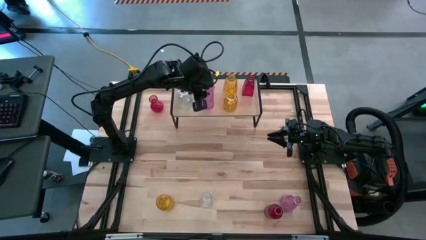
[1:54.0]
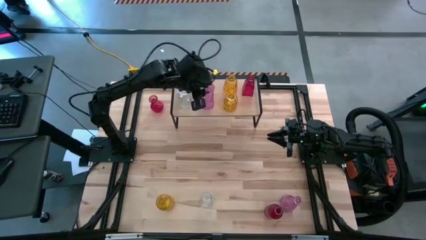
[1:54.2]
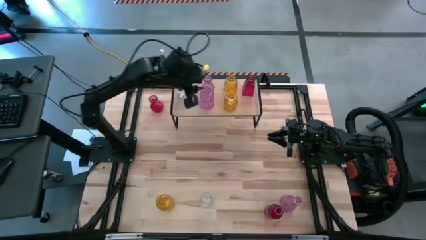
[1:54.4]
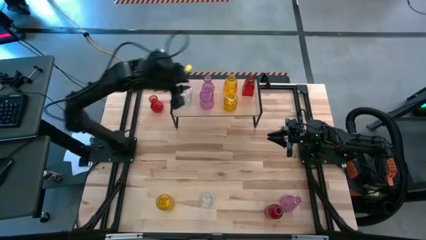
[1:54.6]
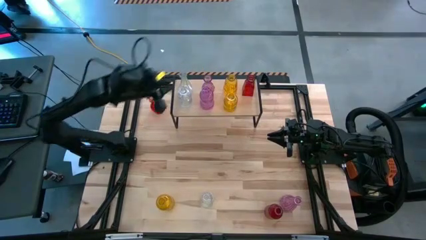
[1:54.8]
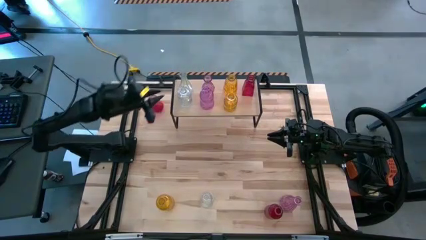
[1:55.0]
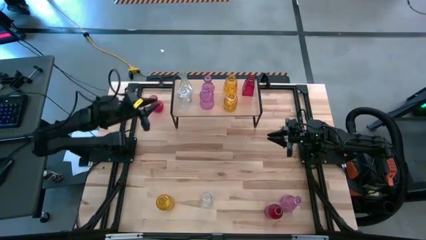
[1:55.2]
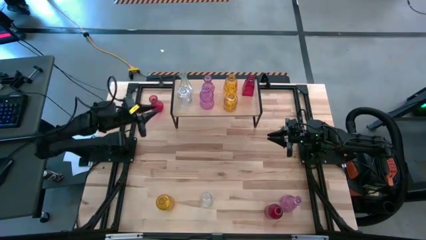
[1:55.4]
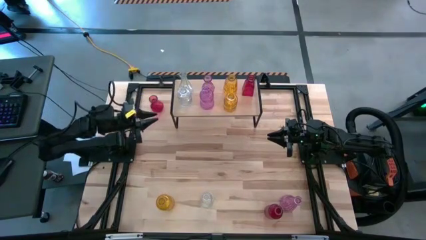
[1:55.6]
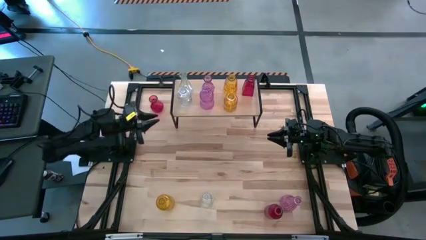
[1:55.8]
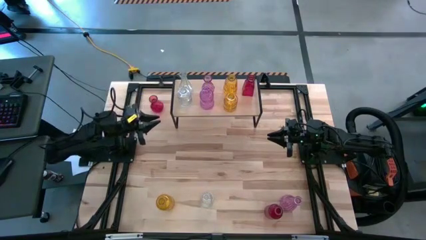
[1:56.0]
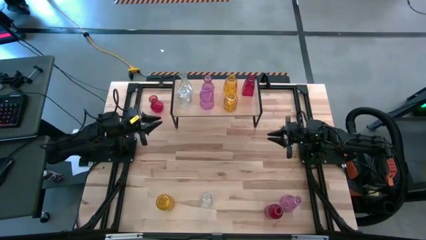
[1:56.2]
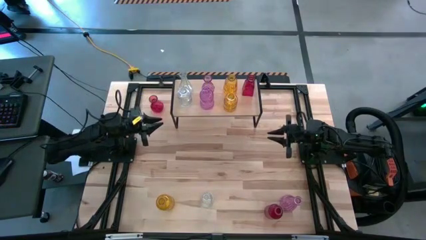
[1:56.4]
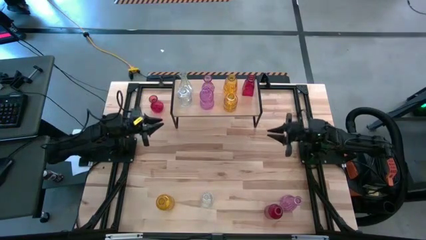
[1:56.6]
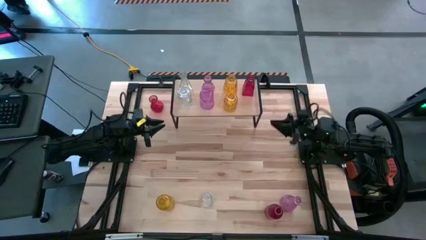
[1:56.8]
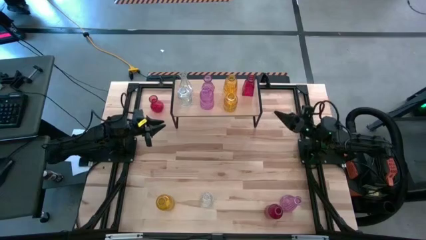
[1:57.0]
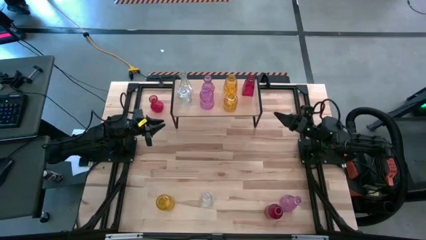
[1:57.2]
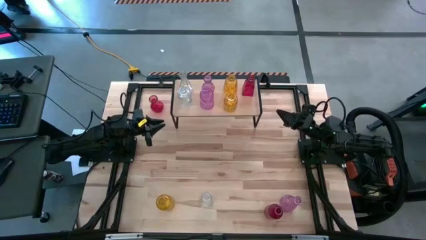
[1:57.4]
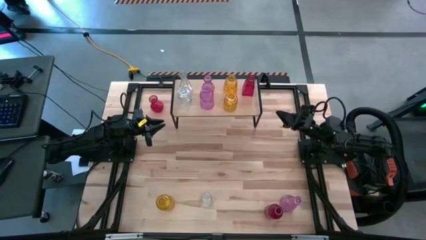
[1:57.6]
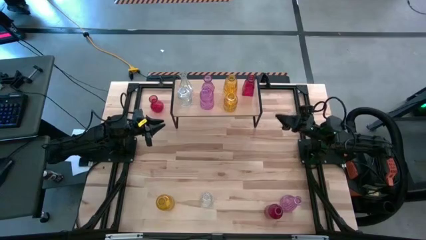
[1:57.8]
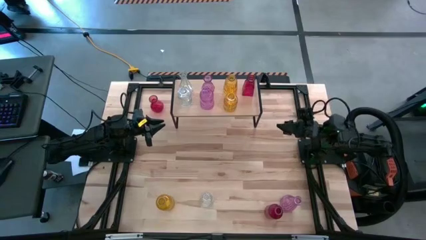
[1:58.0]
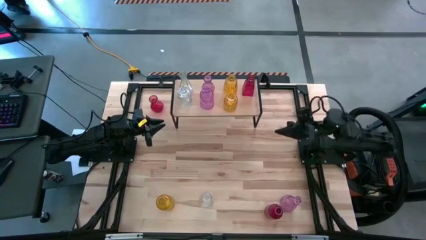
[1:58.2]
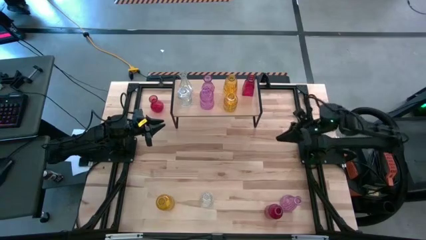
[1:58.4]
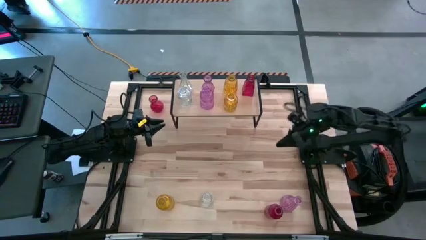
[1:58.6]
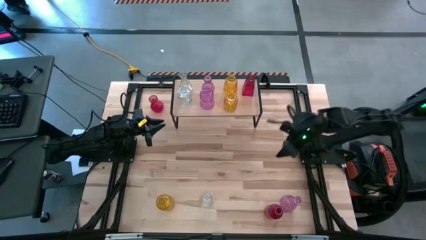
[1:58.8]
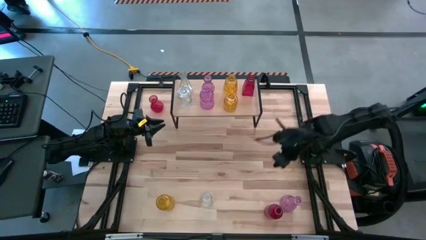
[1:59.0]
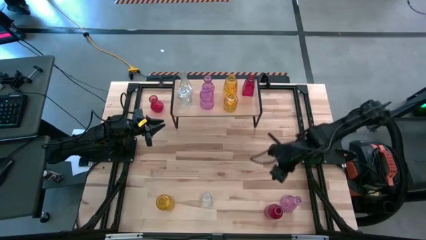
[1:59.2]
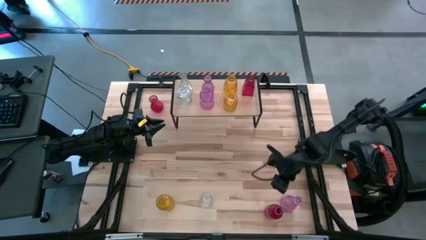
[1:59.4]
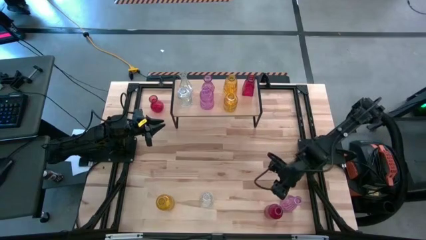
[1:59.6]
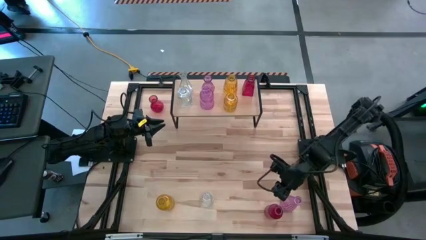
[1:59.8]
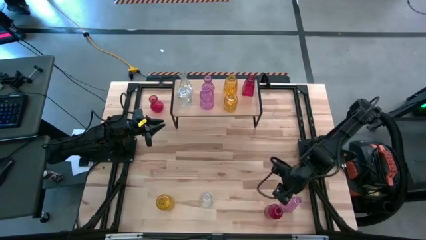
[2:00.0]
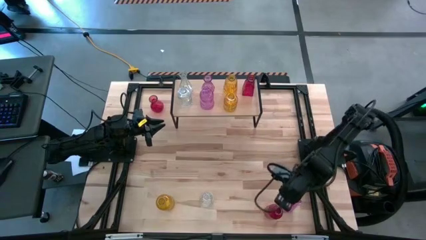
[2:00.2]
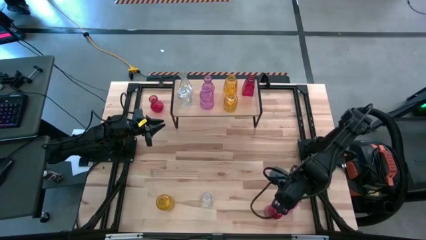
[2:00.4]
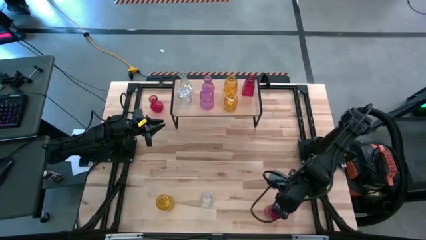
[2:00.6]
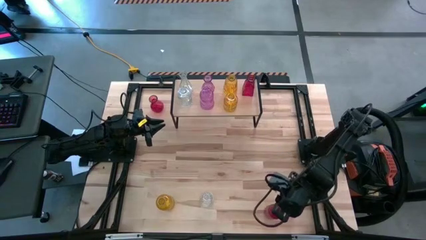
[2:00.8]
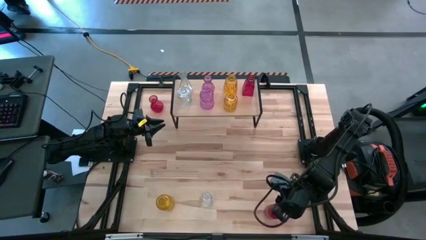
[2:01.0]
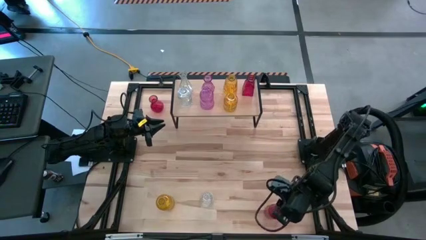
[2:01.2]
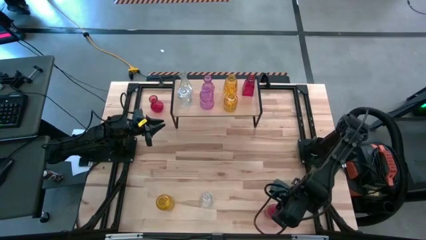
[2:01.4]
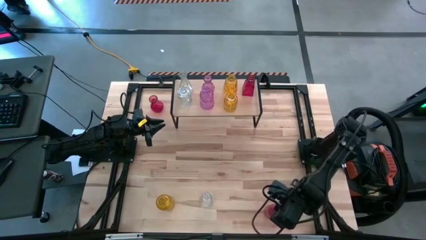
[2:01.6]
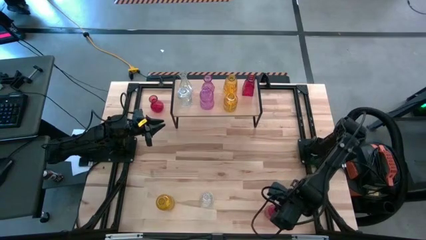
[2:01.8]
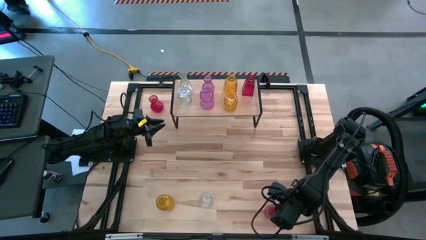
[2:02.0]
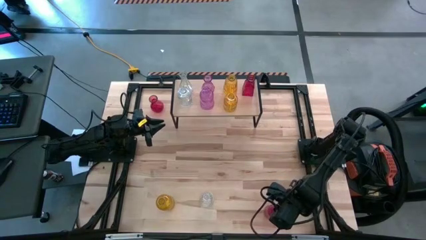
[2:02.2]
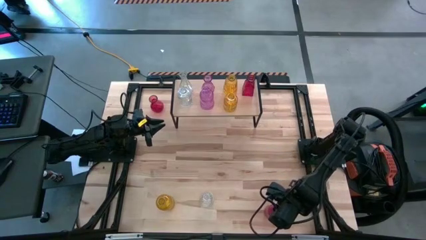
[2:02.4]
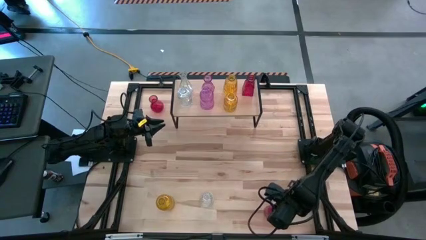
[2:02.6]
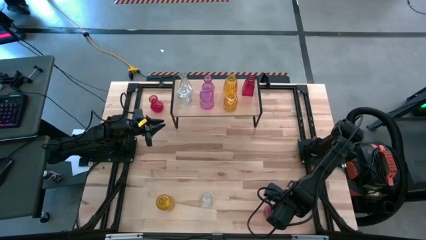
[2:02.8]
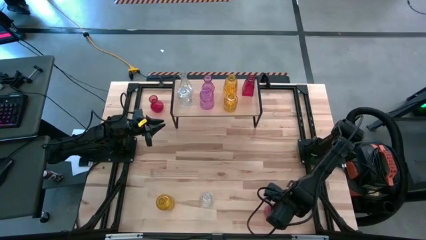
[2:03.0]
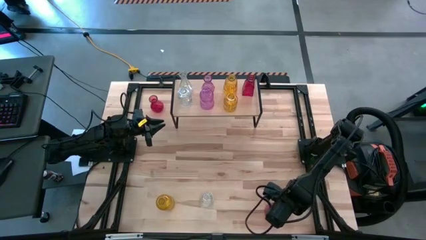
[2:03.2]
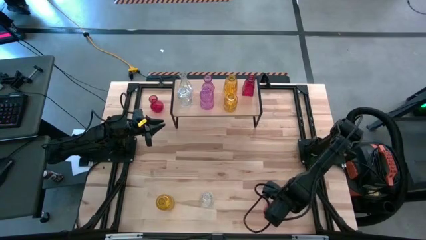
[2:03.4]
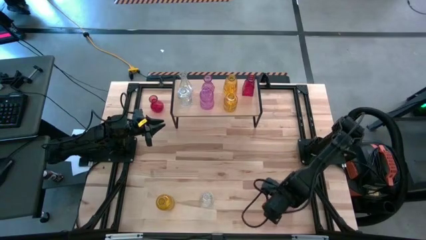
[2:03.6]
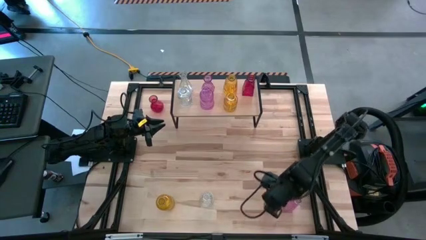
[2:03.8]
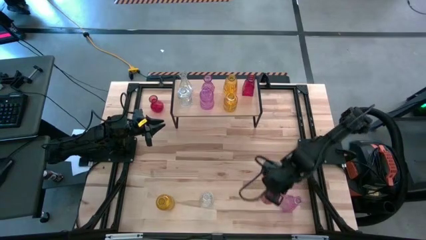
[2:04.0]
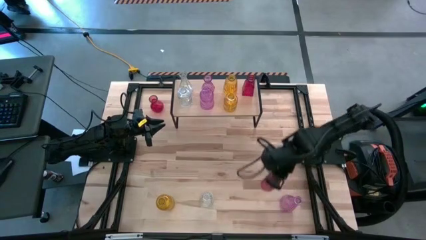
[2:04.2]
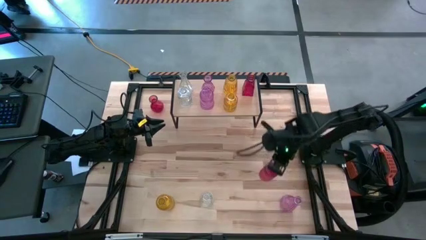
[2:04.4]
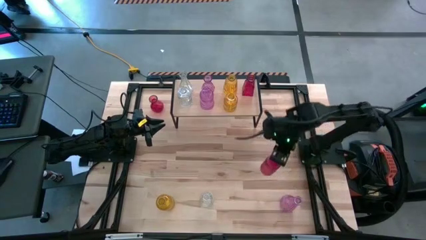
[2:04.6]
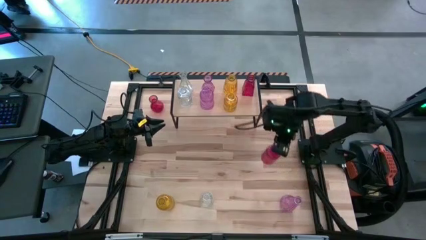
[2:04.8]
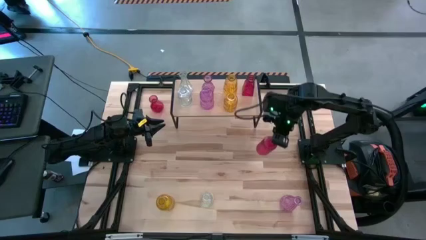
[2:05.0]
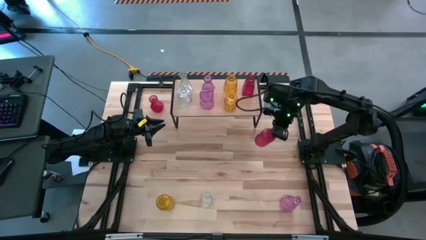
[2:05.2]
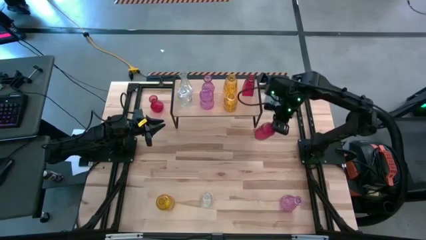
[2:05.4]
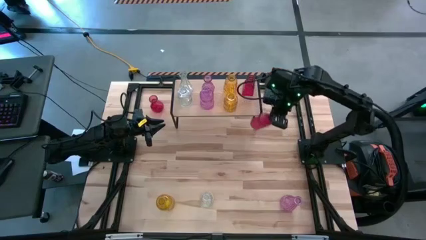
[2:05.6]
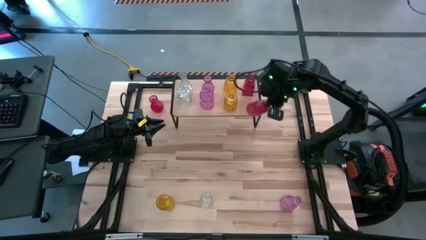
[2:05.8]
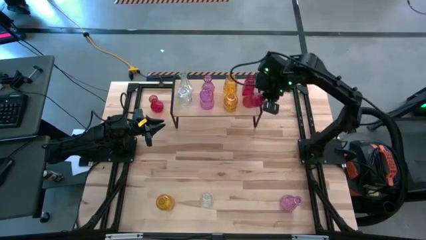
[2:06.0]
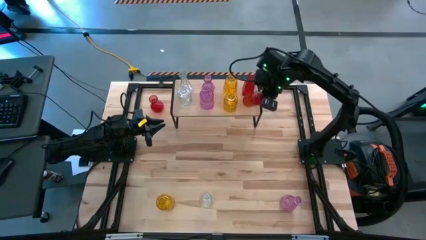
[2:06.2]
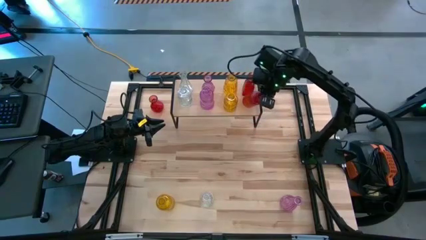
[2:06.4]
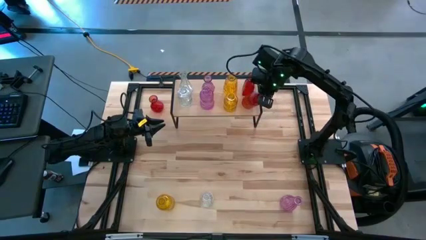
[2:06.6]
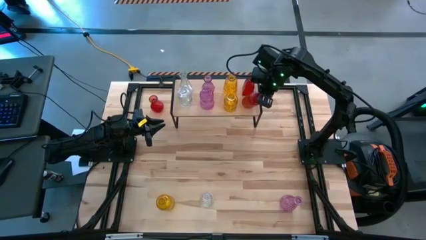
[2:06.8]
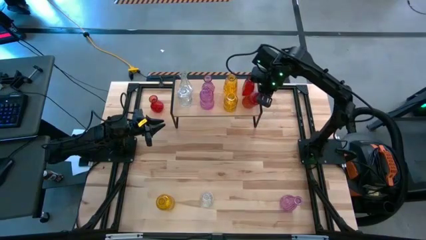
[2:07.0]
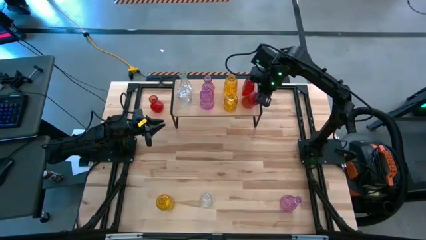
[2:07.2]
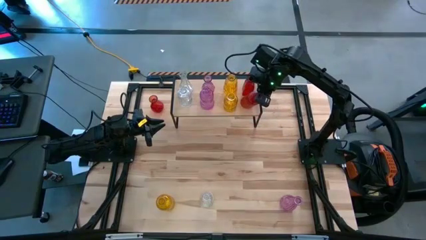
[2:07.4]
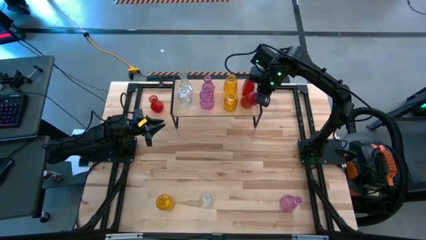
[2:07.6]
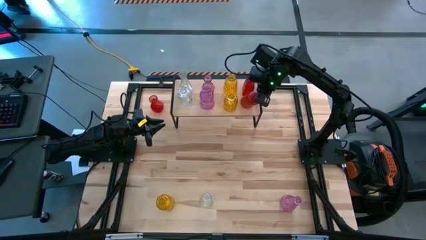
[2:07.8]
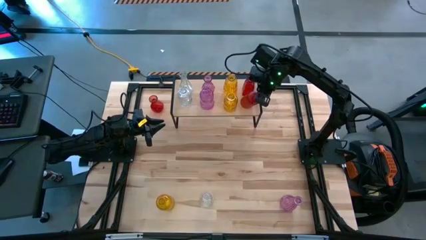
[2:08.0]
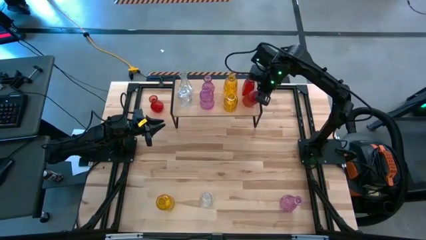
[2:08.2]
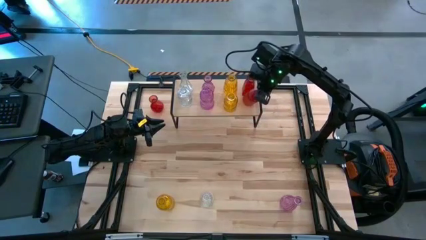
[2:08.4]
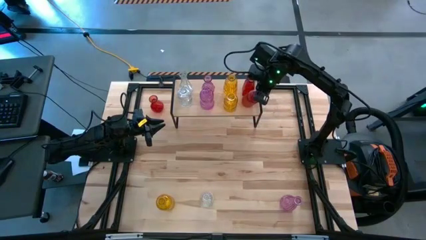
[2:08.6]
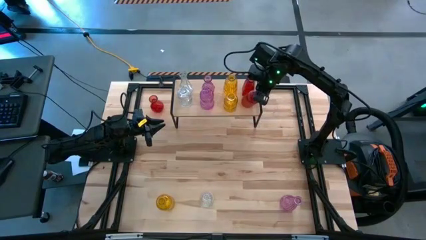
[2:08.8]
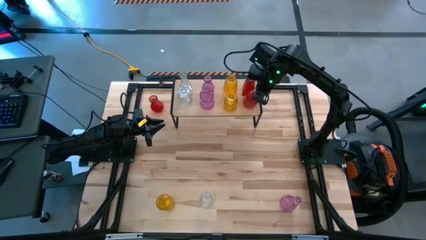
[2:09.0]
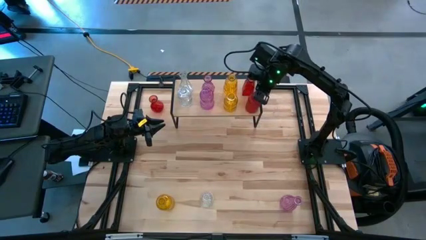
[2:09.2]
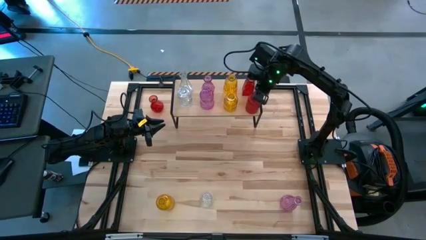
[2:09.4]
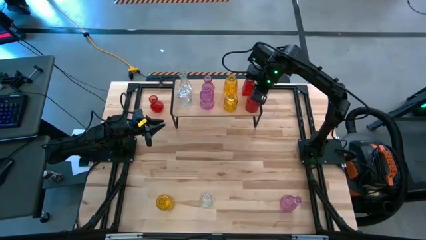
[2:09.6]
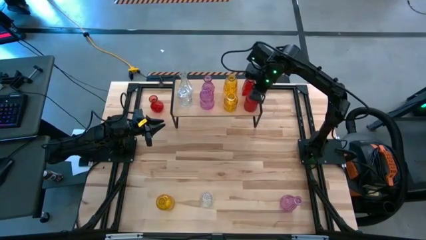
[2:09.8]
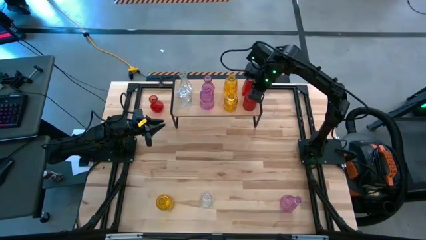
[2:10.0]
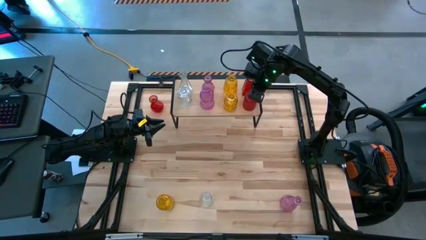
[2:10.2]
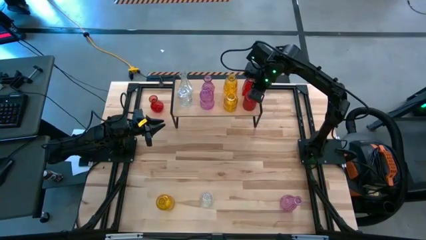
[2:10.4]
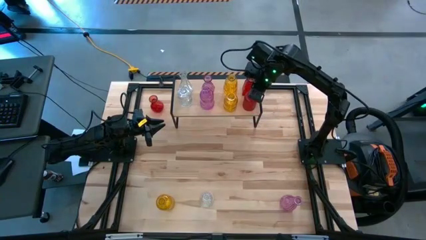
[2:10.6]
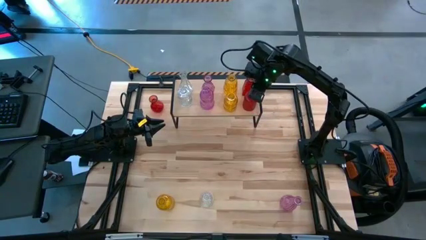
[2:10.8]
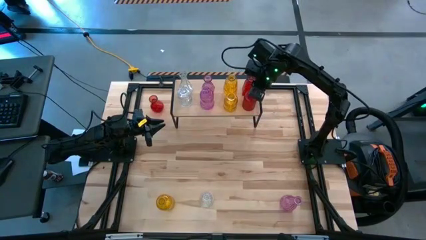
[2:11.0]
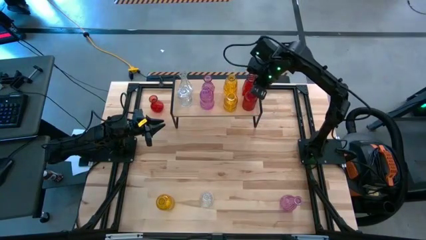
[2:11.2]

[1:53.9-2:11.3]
Task: sort vases onto shelf
Put the bottom red vase on the shelf aligned with the other red vase
